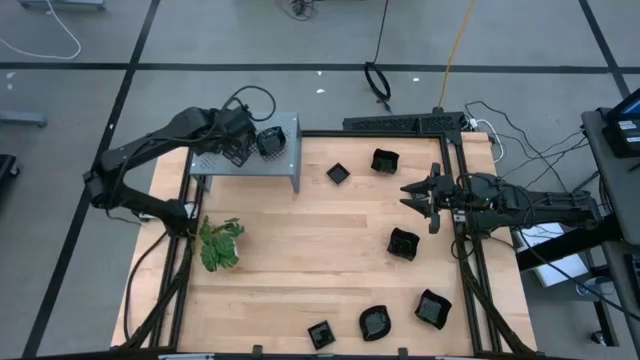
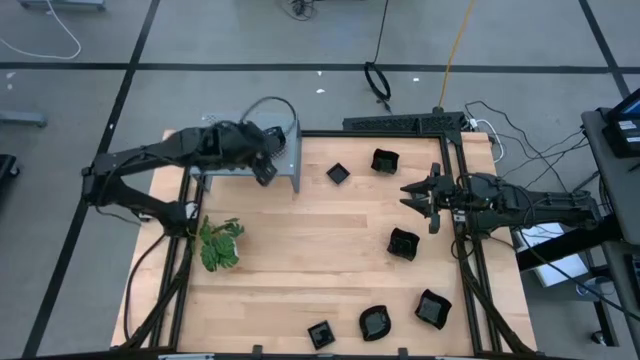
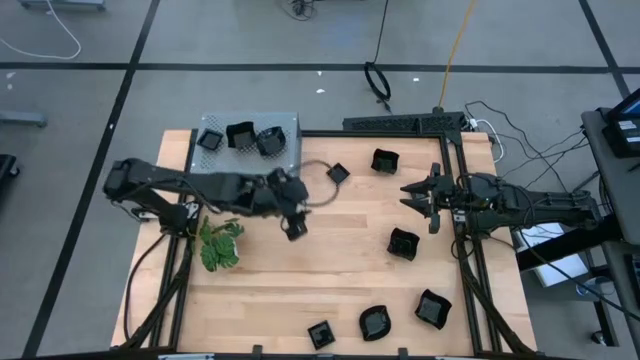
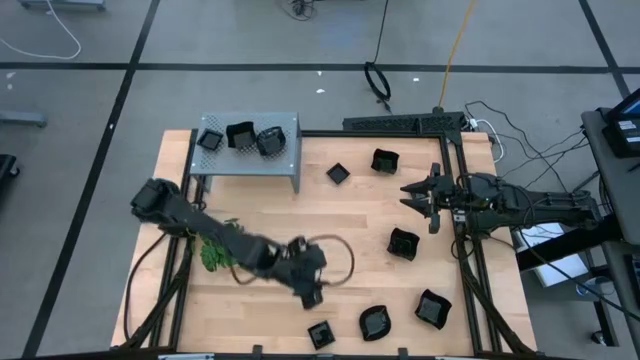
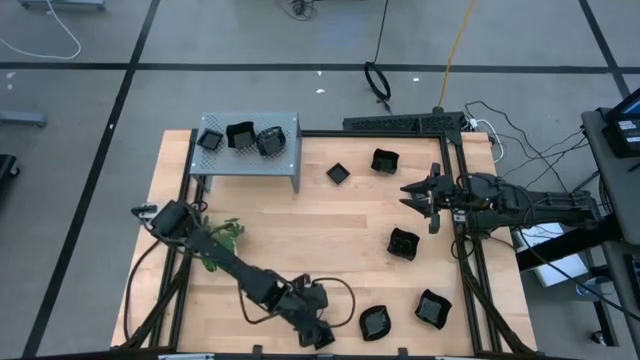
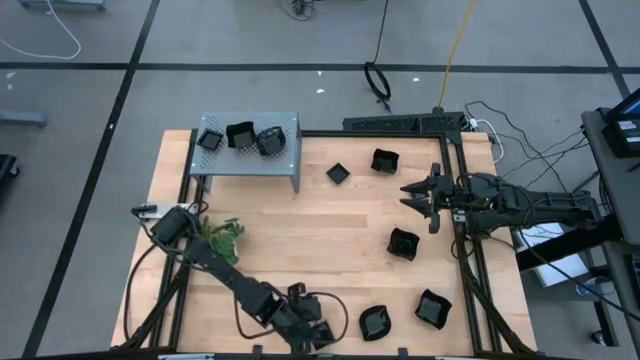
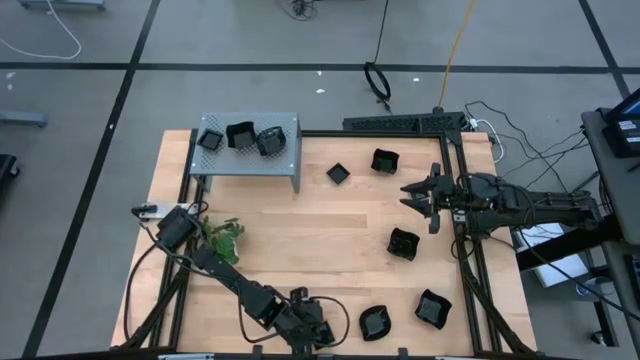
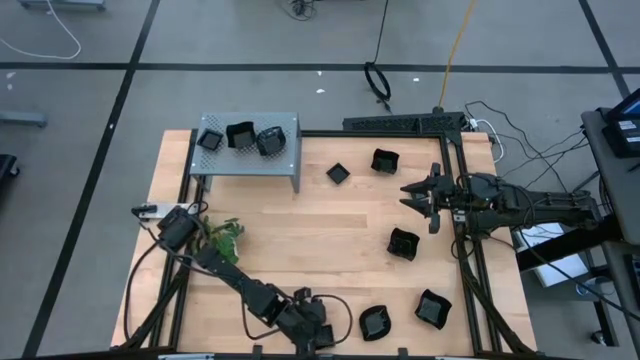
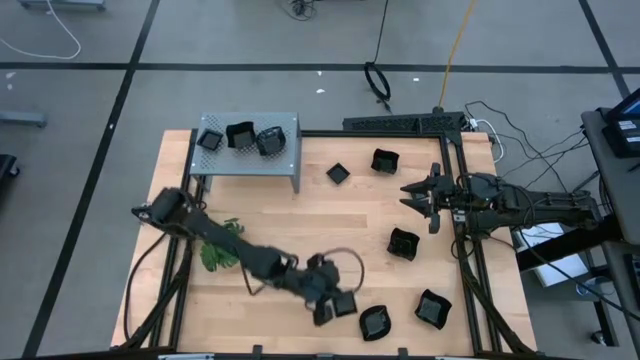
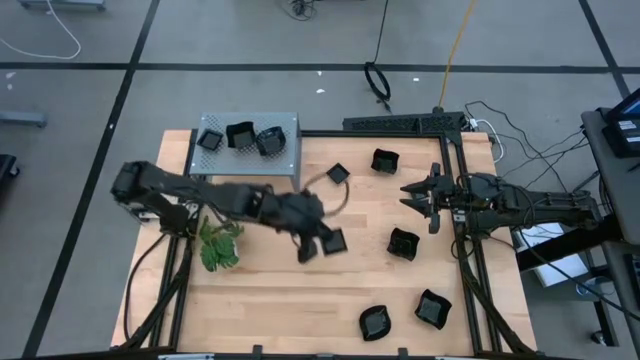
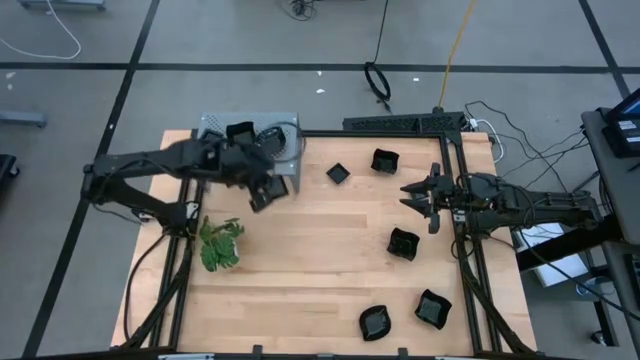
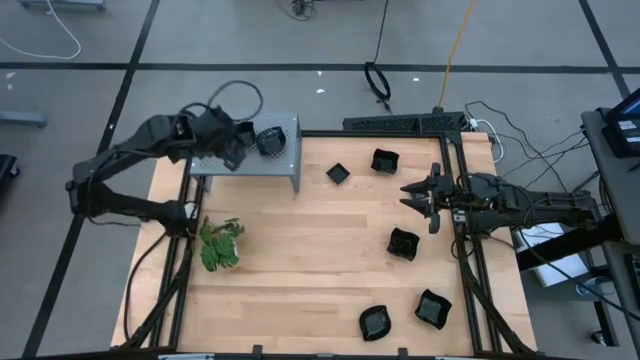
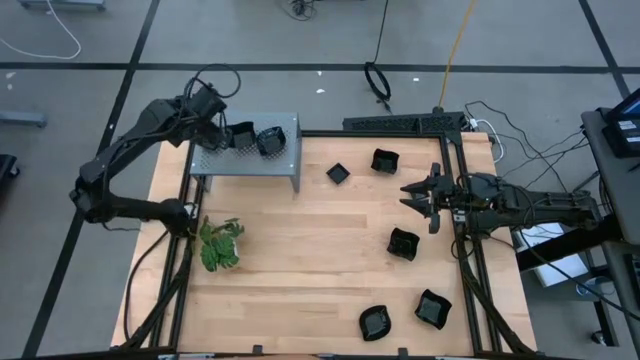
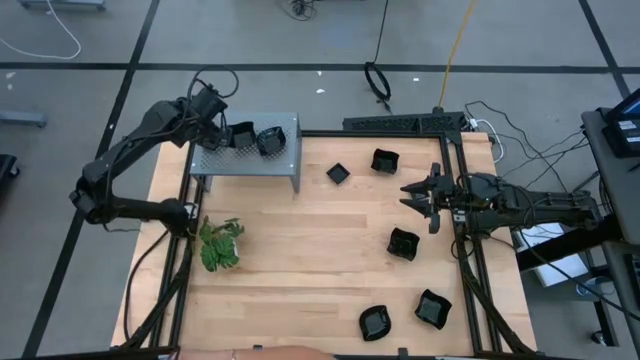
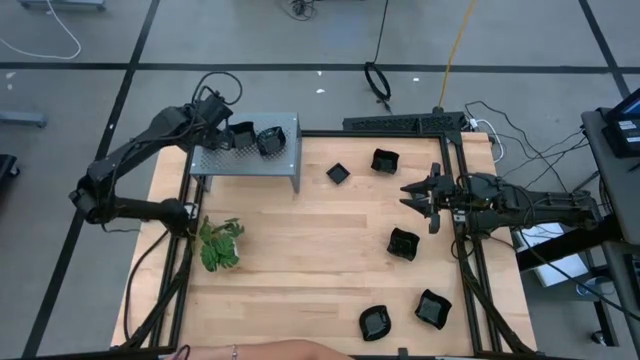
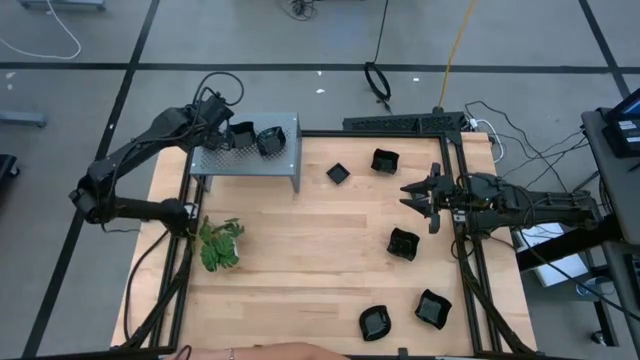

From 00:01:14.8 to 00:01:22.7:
Task: Pick & Place Mini shaped plates
Stack the square plate on top of the square plate on the shelf

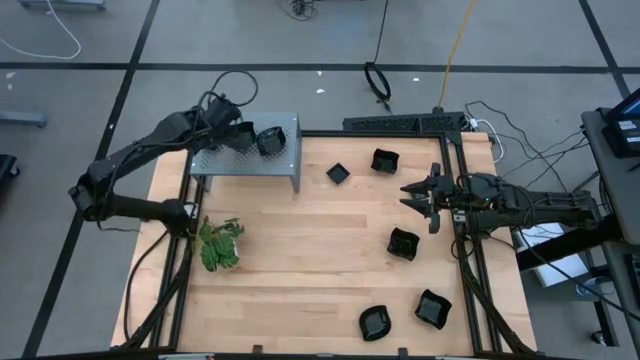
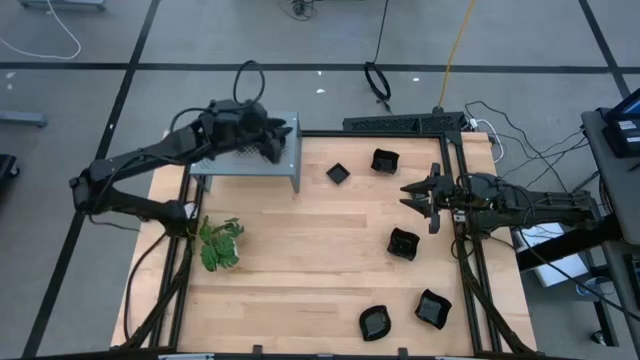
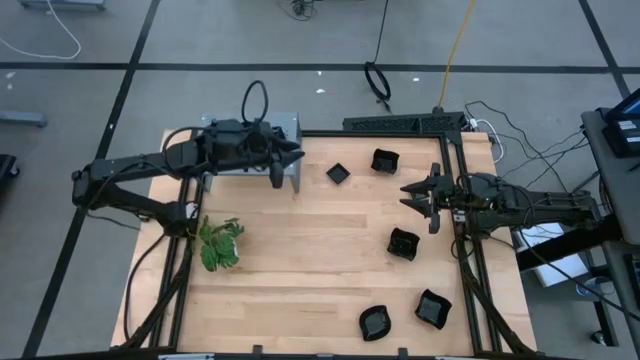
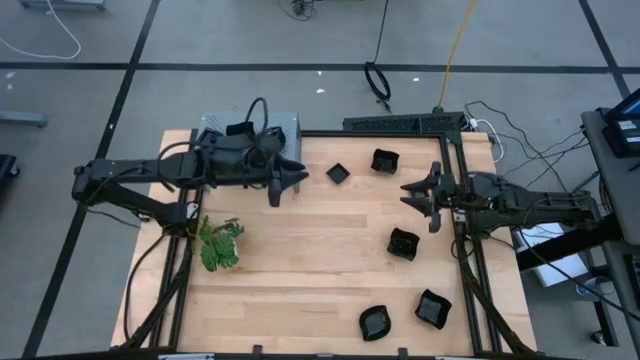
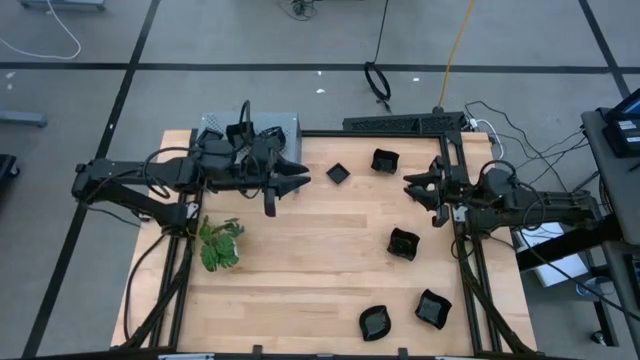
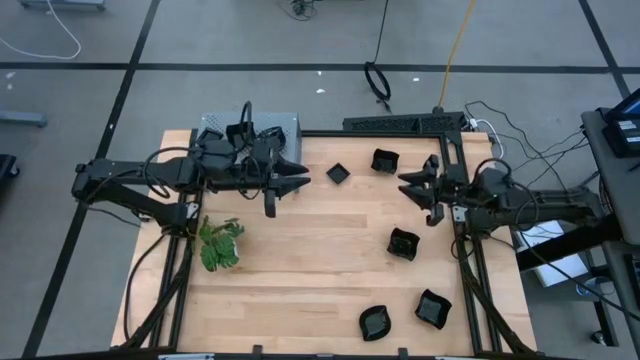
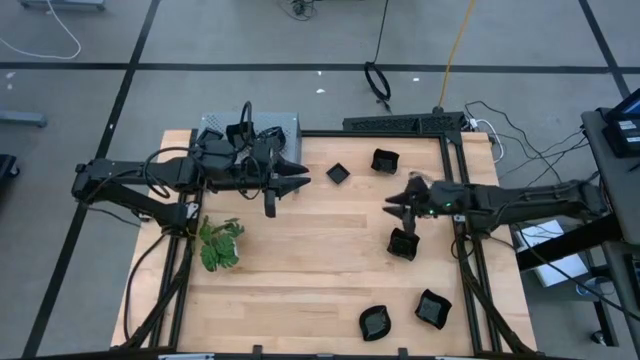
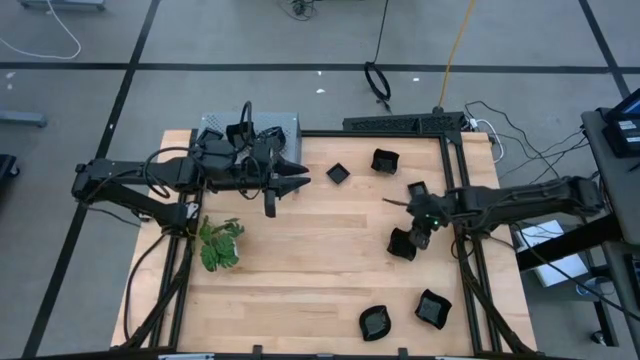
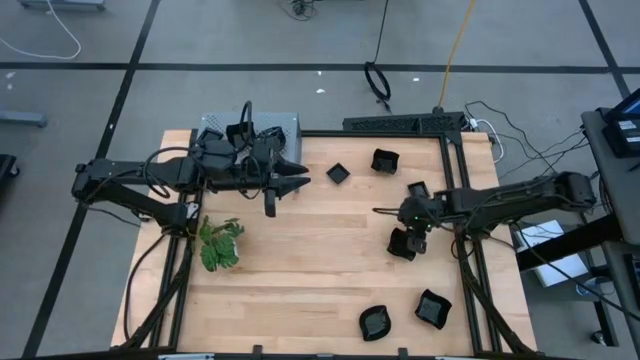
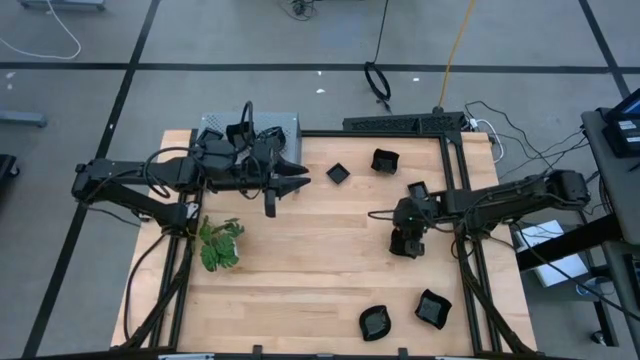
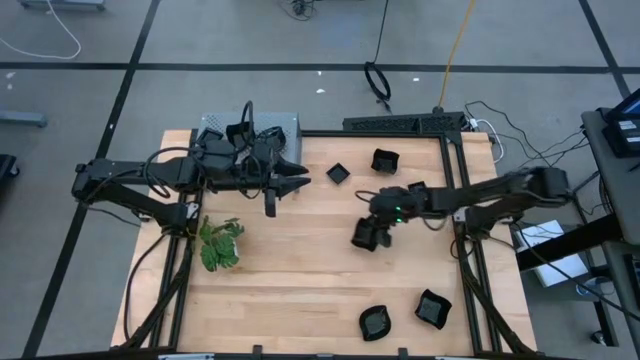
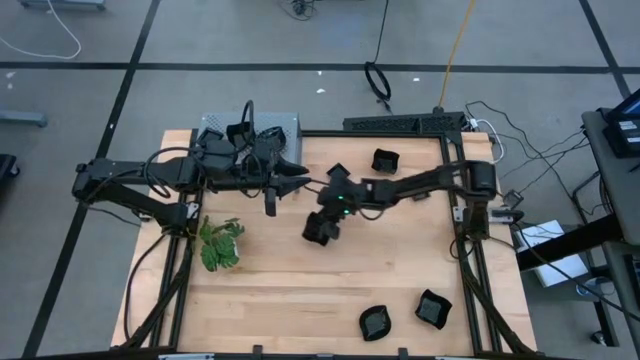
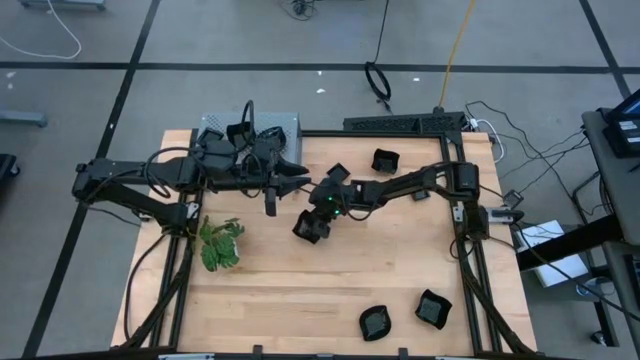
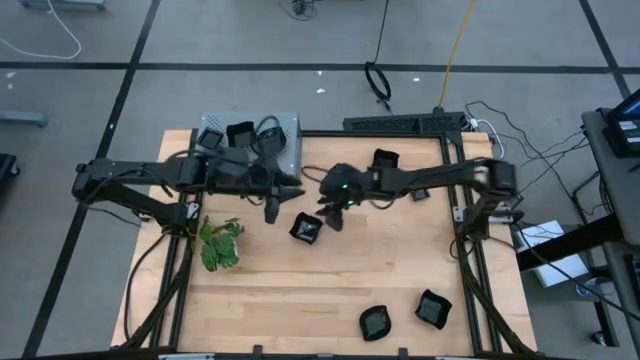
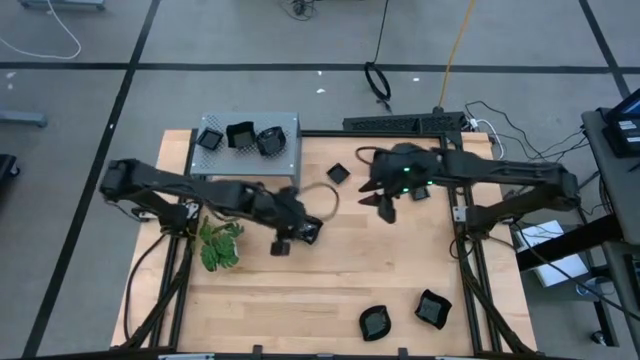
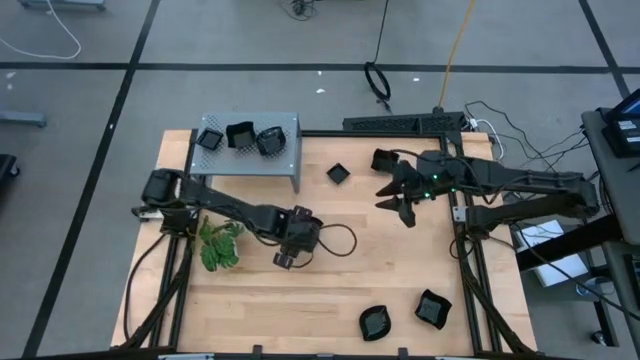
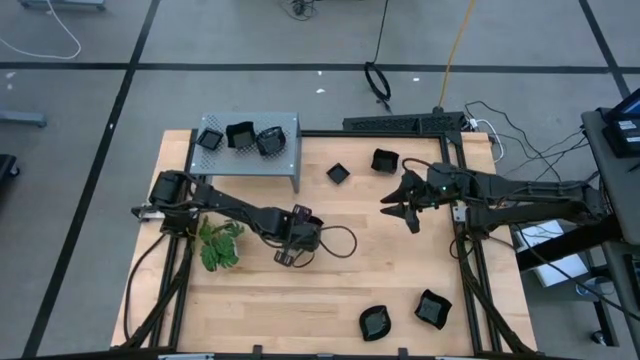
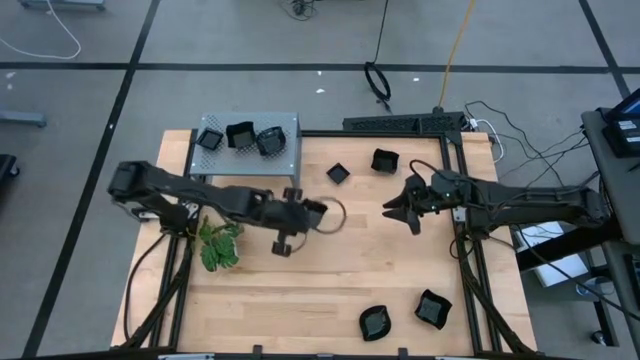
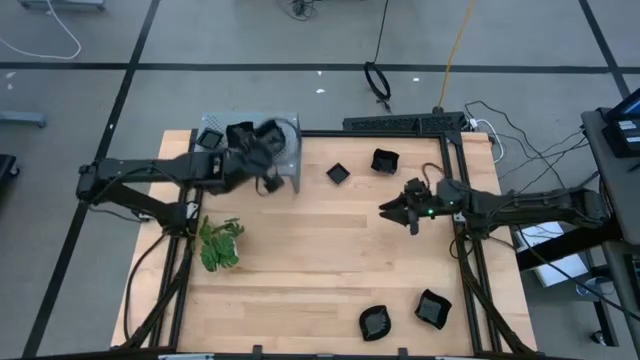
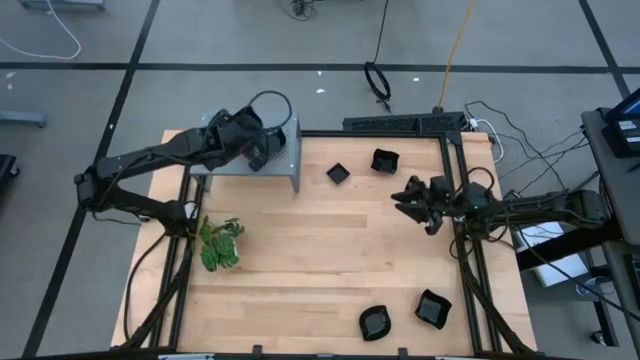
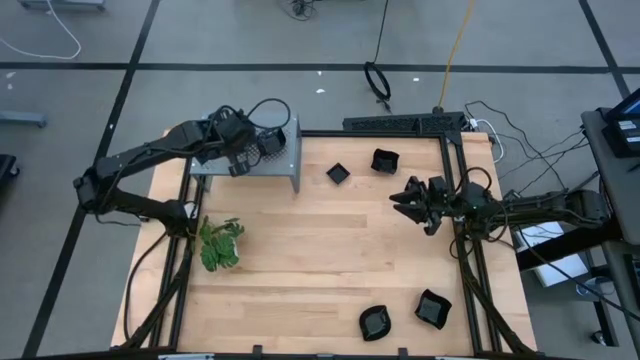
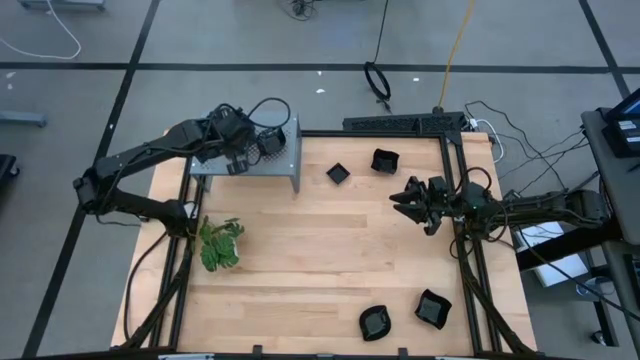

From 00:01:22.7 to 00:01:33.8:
Stack the distorted square plate on top of the distorted square plate on the shelf

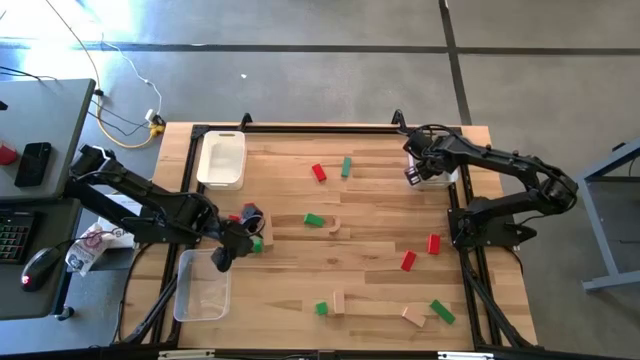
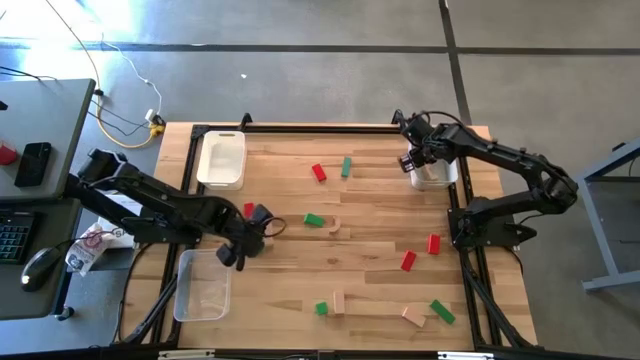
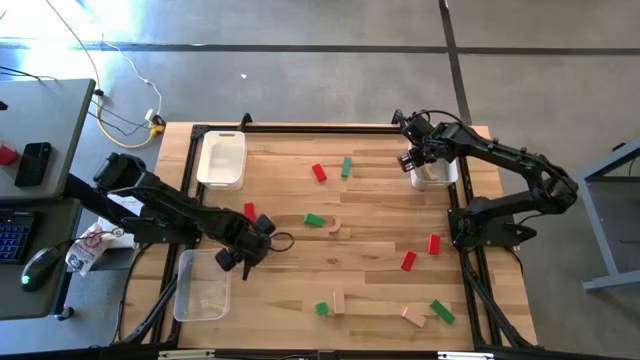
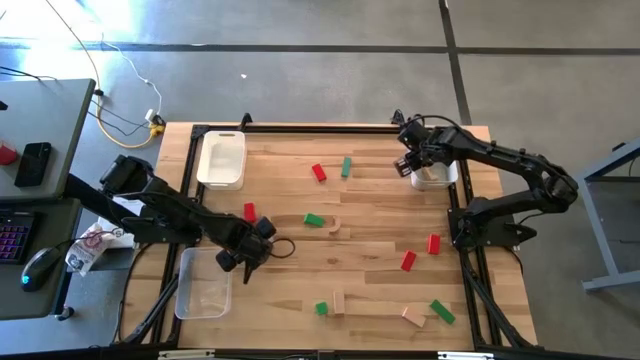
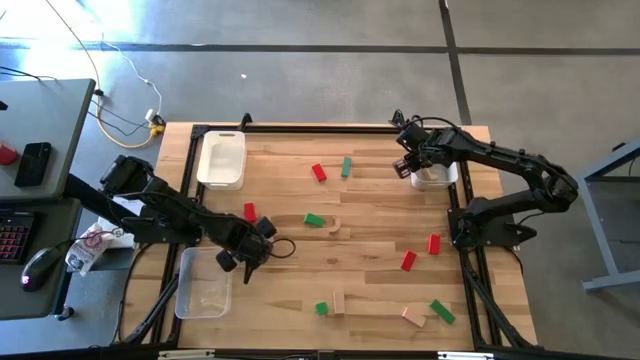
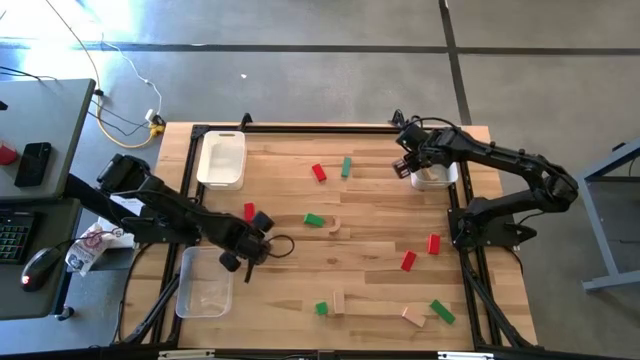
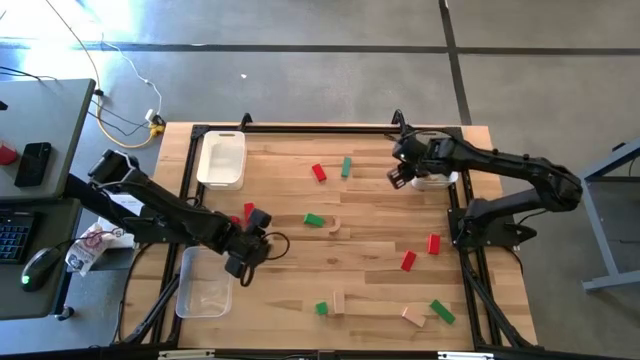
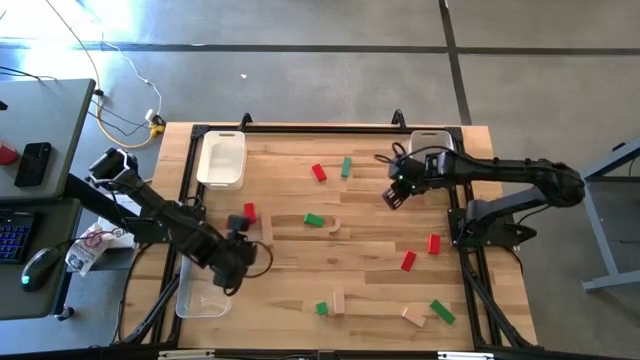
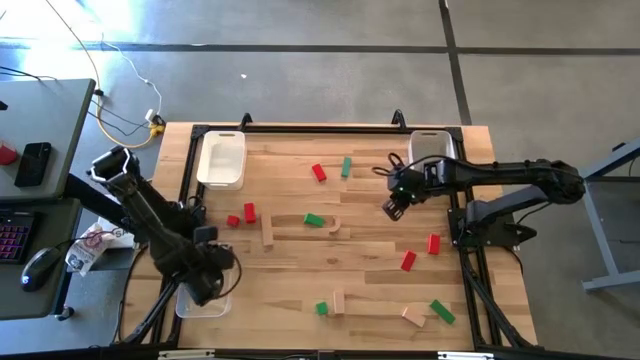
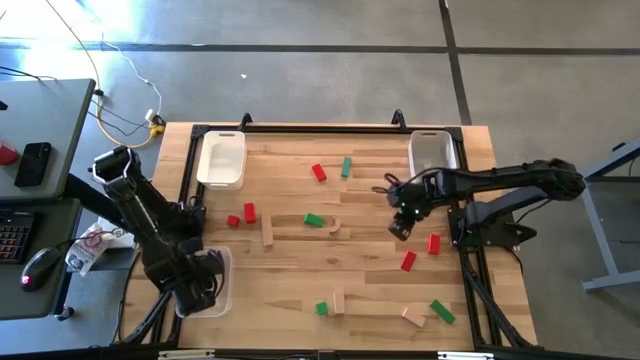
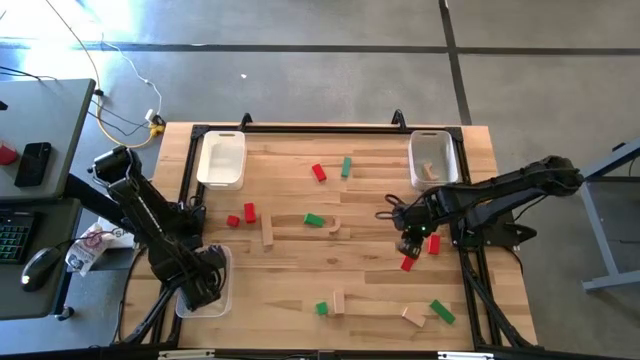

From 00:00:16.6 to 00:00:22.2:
Task: Sort & place blocks by color
Put the green block into the transparent bin
